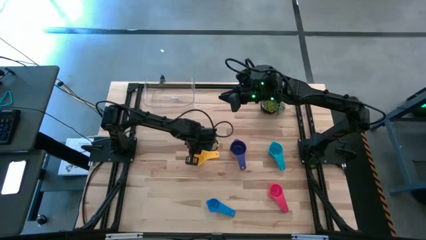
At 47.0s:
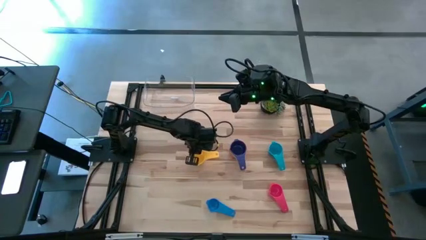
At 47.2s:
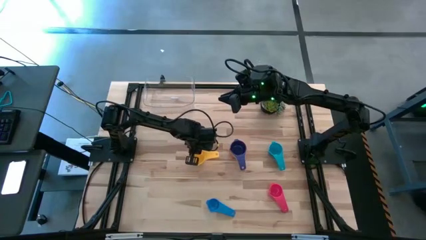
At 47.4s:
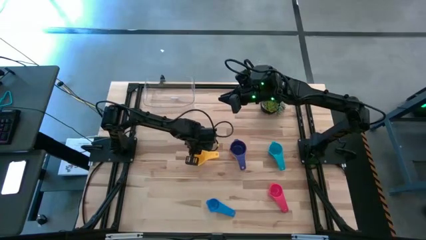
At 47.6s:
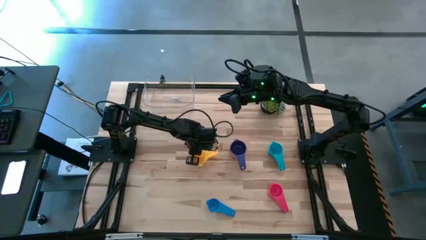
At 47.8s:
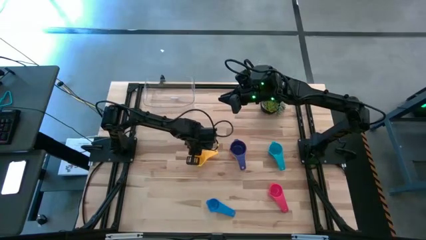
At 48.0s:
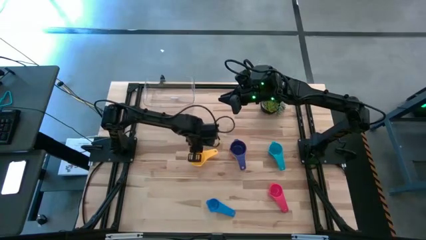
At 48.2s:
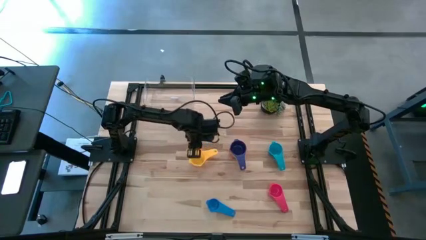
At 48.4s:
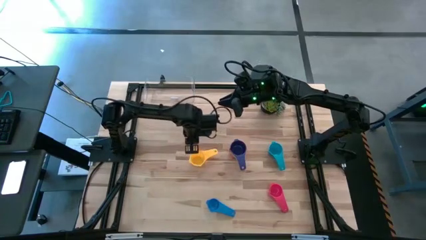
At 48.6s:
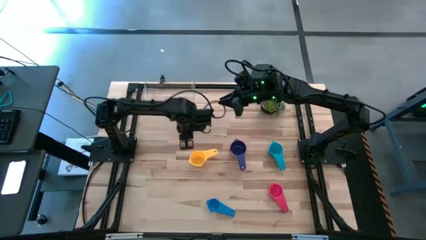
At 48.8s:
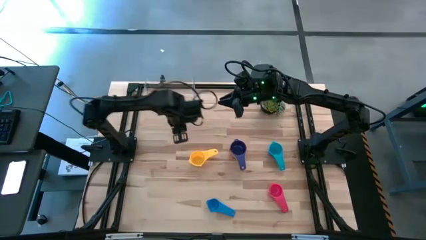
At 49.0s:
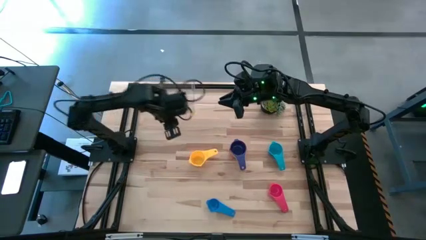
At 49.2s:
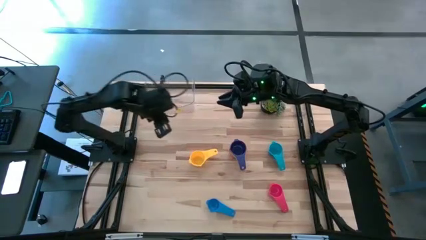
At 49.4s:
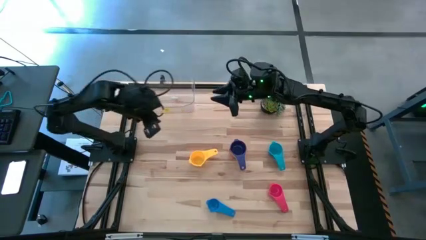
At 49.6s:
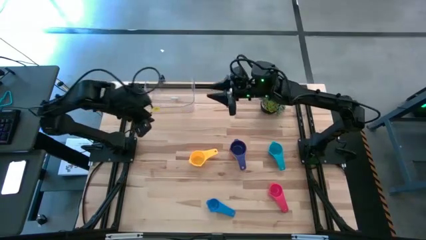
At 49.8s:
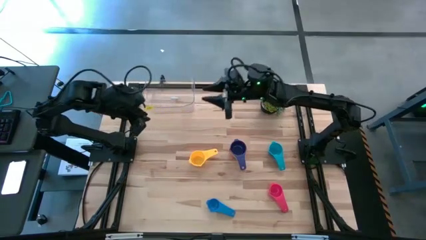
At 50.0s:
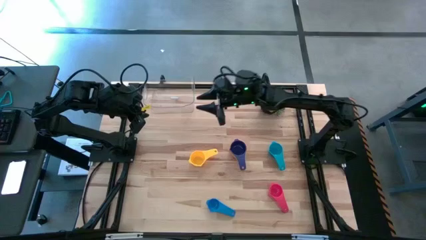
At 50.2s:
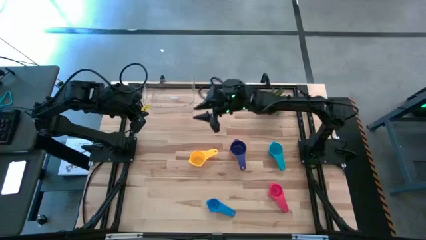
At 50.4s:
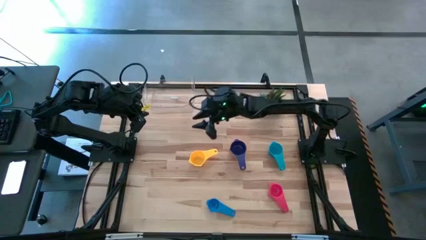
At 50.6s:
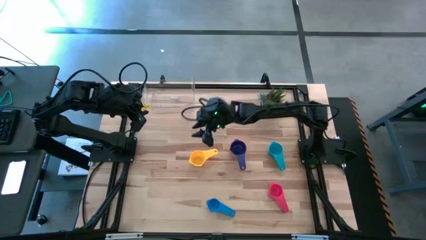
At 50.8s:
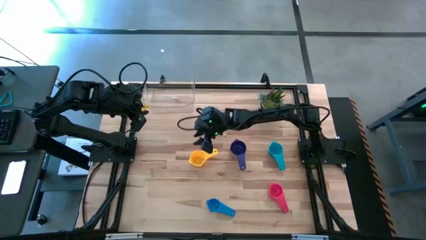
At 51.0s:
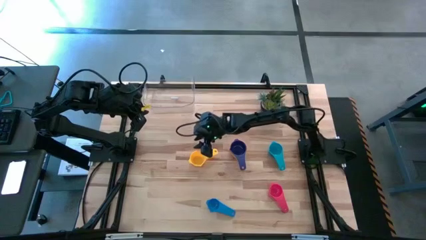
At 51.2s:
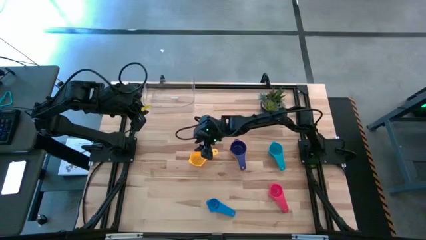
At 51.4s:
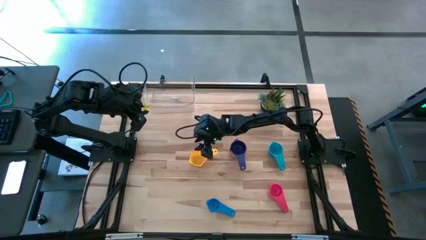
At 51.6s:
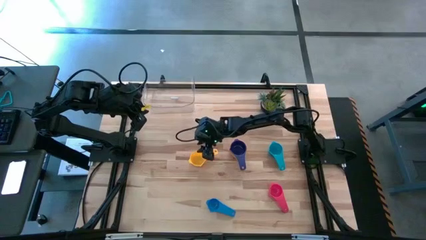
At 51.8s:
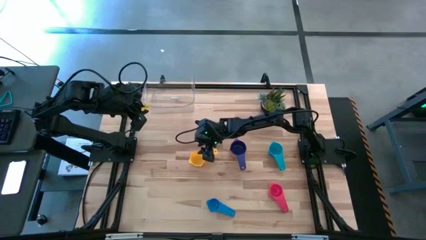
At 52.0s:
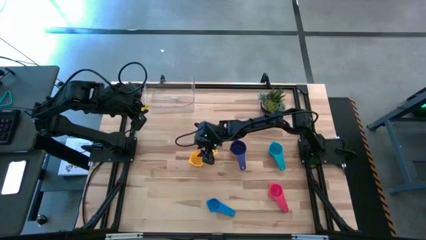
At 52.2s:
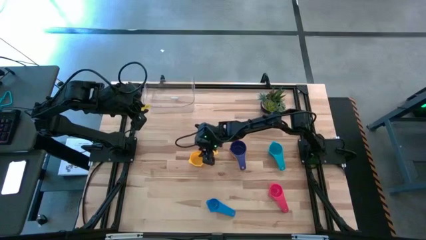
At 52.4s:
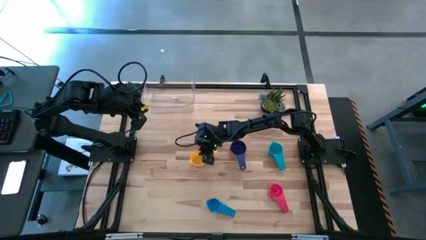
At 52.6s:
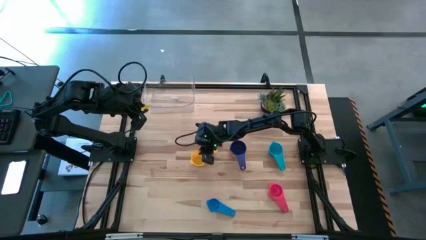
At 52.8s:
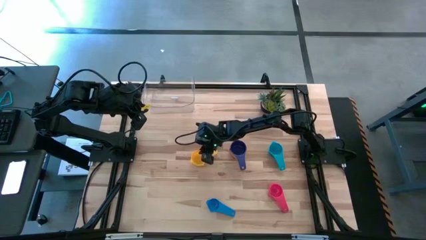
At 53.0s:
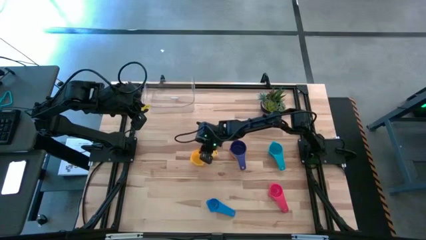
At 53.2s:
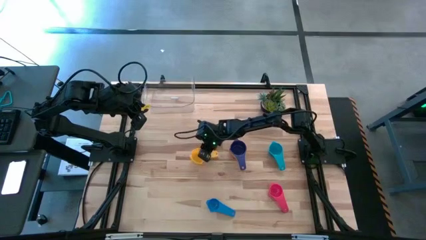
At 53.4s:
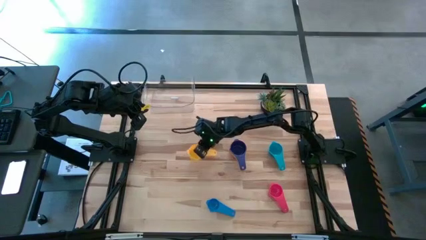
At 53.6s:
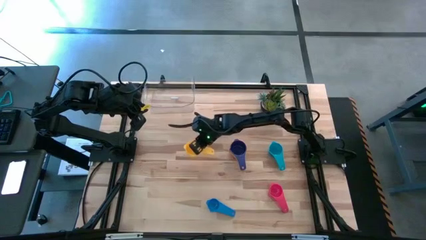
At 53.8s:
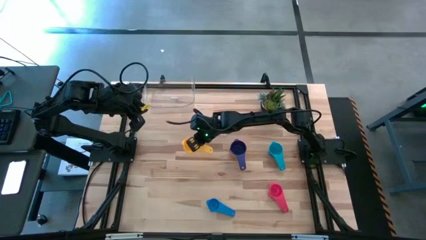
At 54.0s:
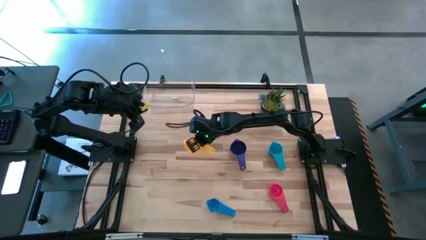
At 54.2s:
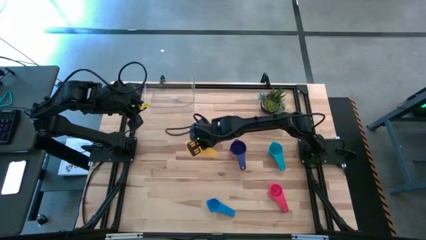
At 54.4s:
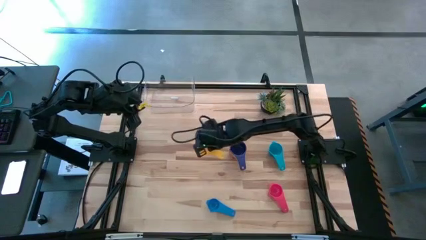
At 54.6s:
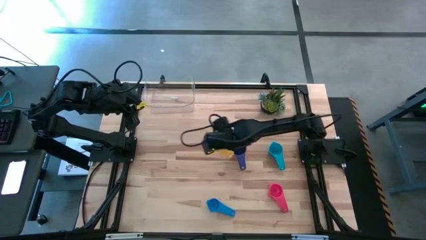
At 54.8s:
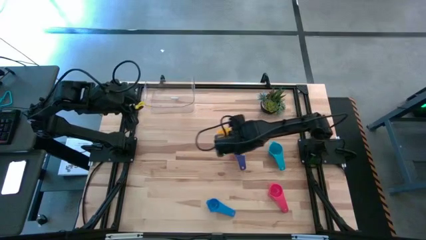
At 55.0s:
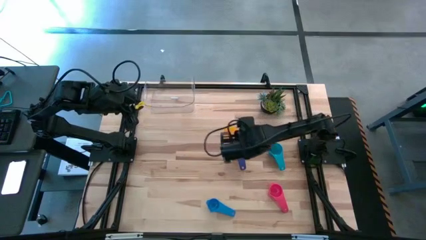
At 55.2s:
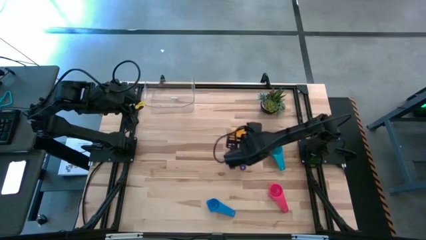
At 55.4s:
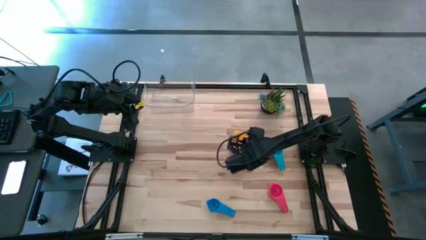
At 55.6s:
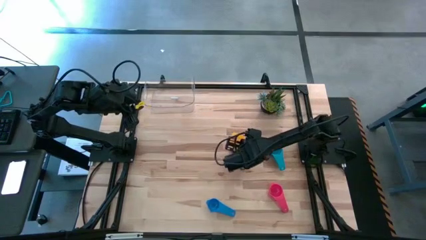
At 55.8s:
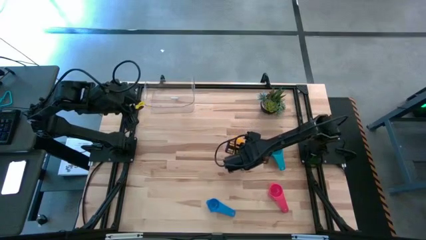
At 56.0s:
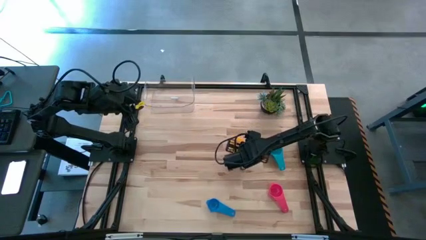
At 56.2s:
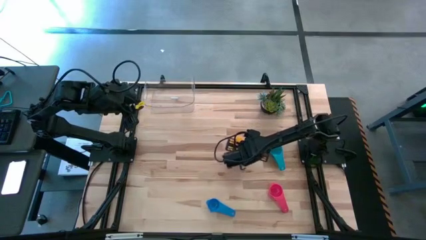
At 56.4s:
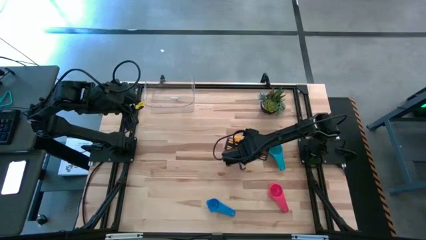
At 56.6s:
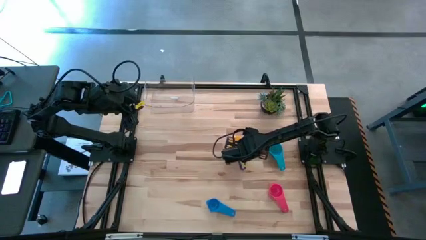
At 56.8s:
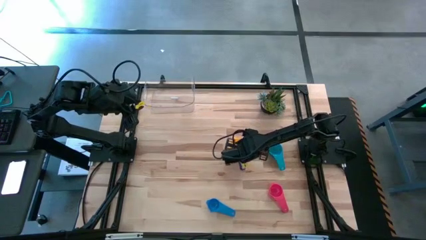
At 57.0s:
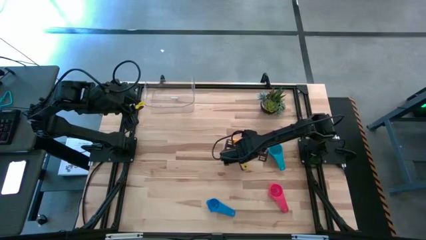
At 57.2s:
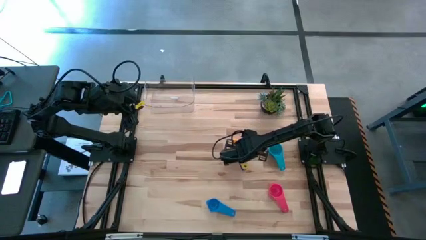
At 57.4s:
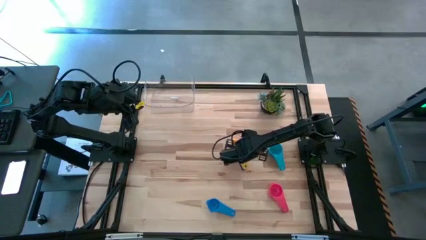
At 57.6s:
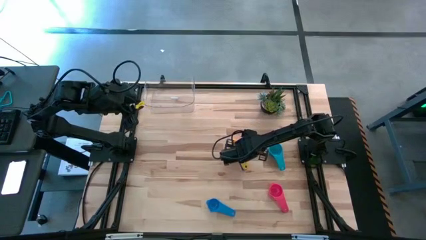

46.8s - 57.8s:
Task: Nest measuring cups in basket
Stack the yellow measuring cup on top of the dark blue measuring cup
